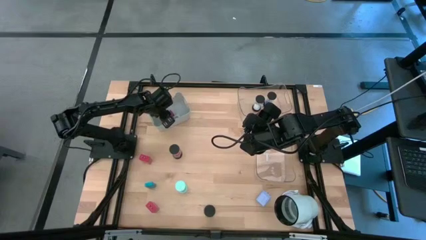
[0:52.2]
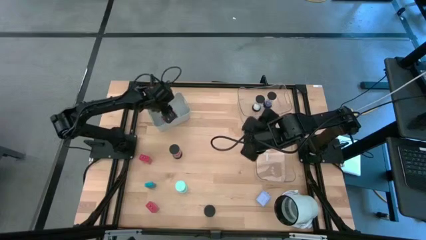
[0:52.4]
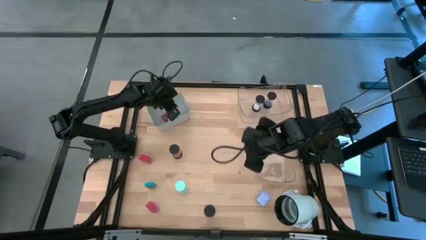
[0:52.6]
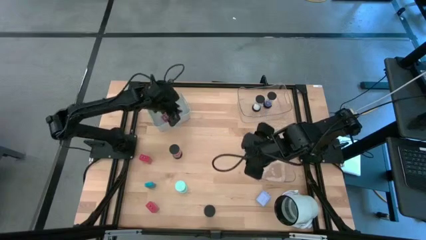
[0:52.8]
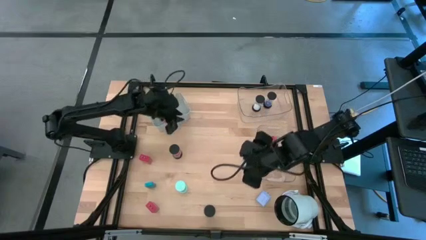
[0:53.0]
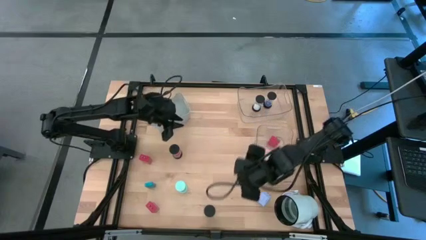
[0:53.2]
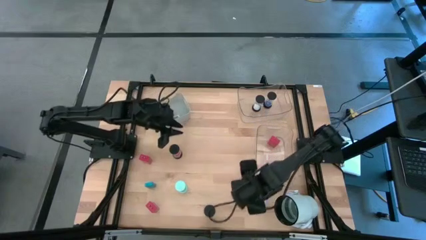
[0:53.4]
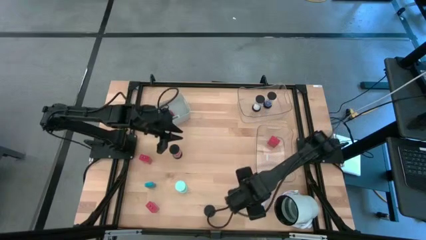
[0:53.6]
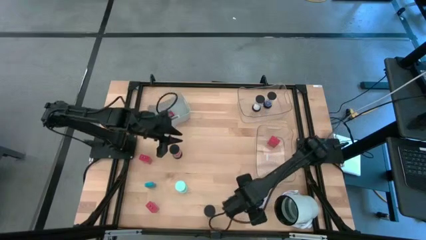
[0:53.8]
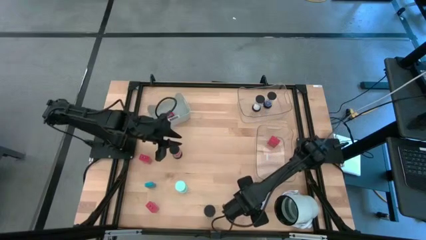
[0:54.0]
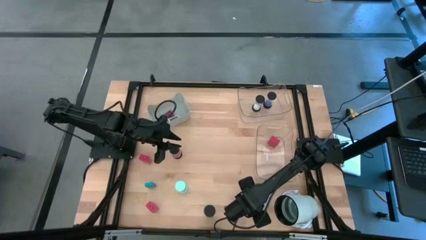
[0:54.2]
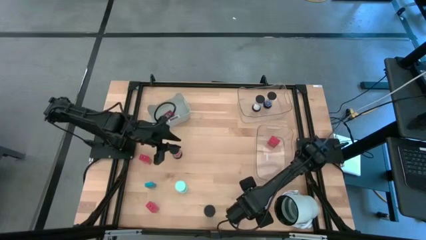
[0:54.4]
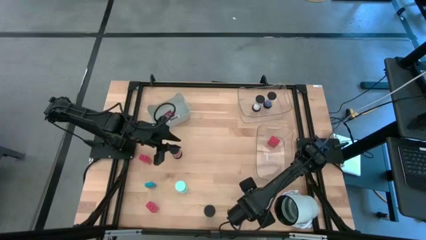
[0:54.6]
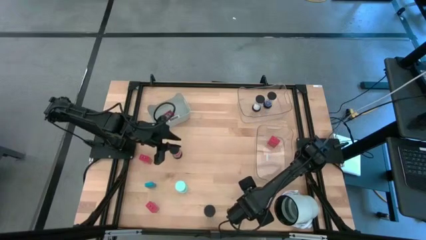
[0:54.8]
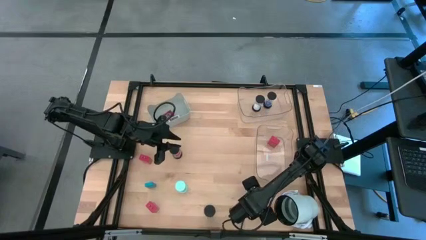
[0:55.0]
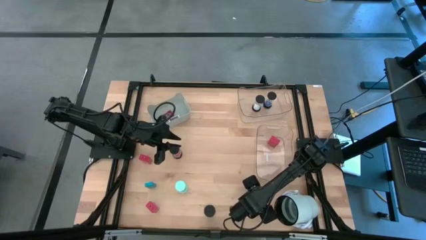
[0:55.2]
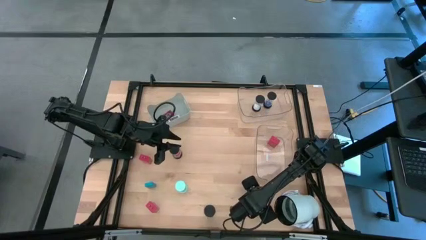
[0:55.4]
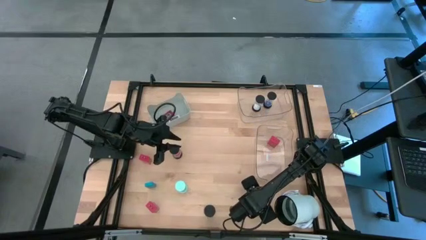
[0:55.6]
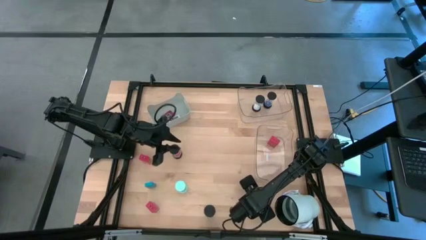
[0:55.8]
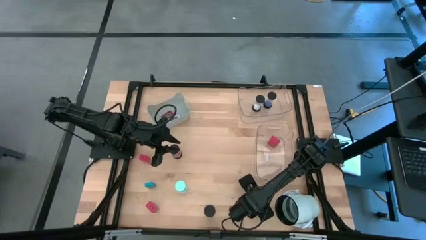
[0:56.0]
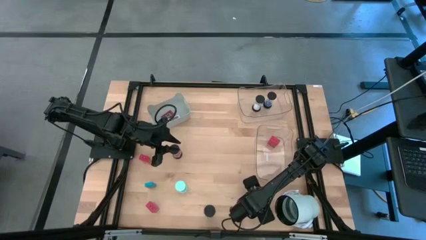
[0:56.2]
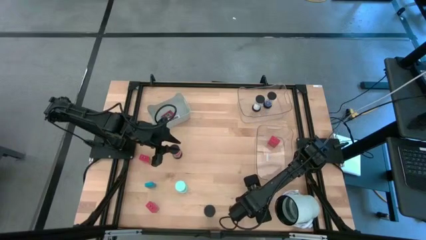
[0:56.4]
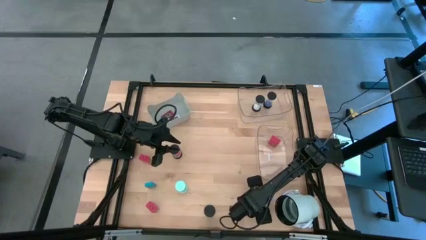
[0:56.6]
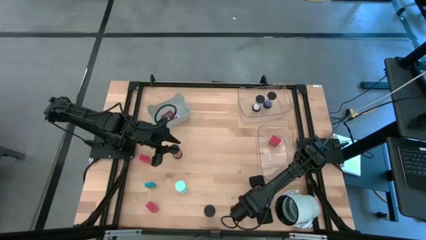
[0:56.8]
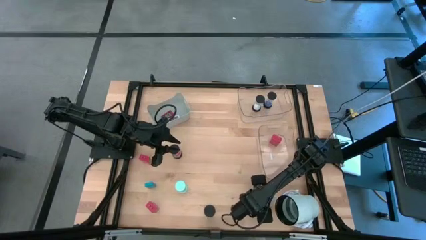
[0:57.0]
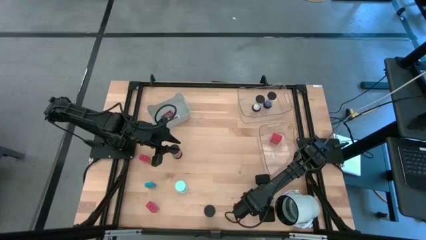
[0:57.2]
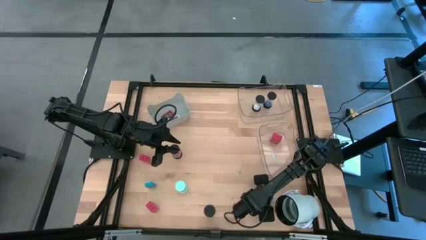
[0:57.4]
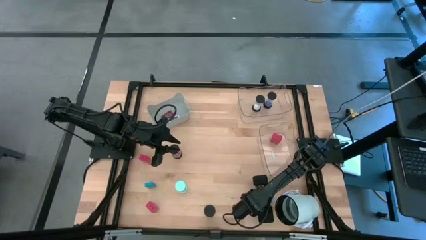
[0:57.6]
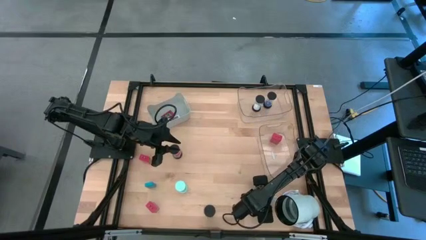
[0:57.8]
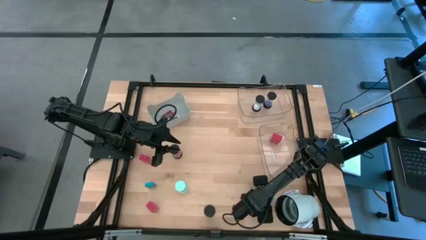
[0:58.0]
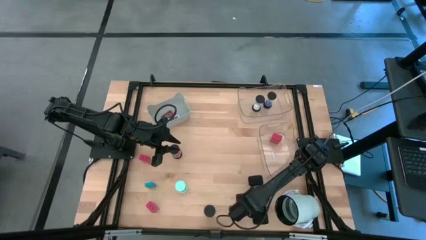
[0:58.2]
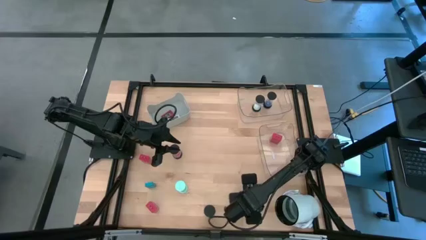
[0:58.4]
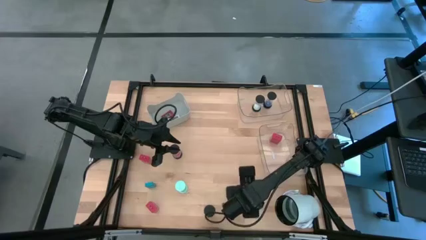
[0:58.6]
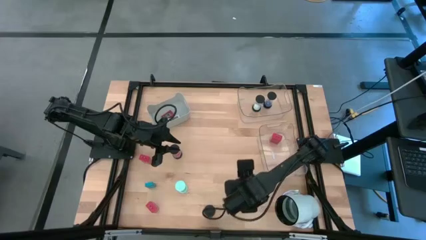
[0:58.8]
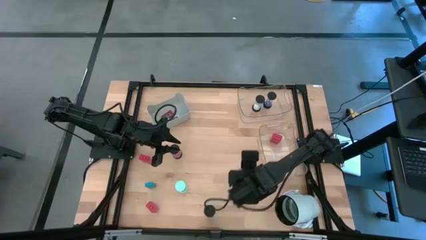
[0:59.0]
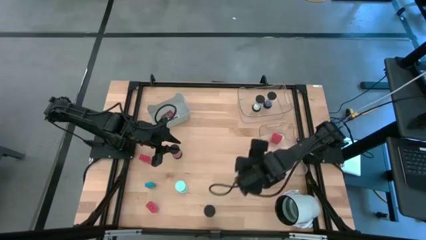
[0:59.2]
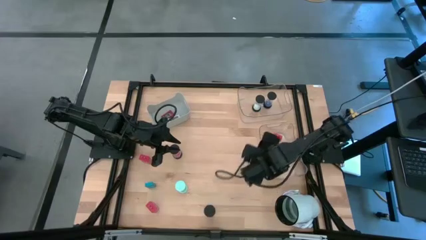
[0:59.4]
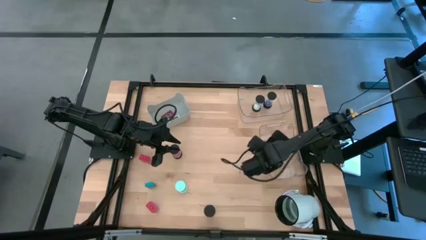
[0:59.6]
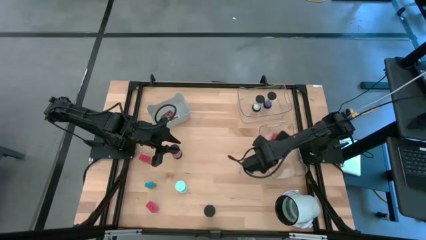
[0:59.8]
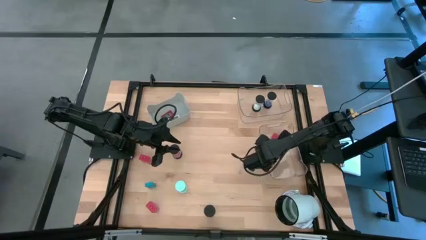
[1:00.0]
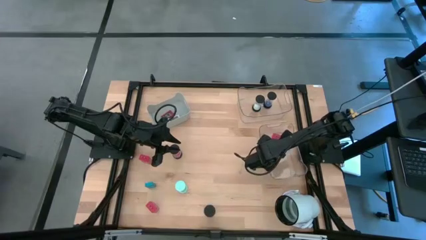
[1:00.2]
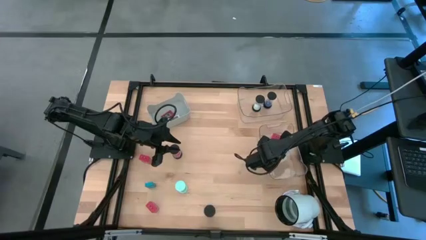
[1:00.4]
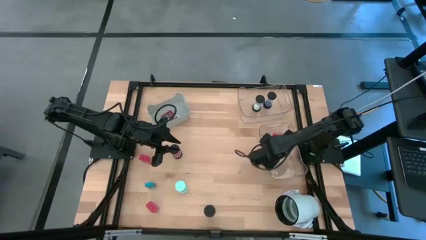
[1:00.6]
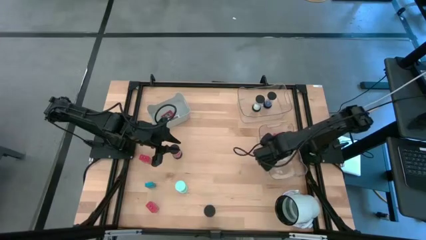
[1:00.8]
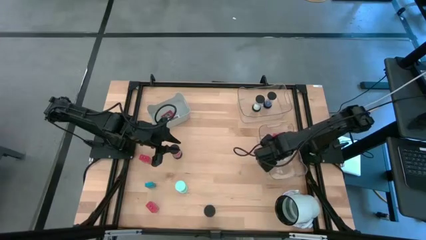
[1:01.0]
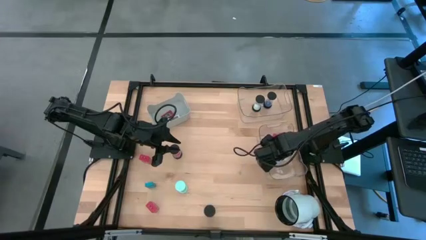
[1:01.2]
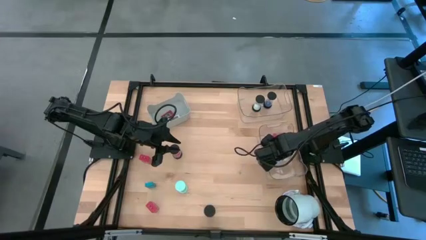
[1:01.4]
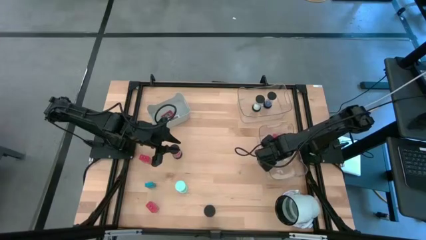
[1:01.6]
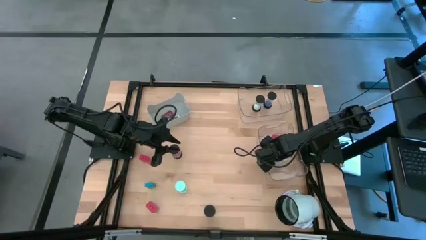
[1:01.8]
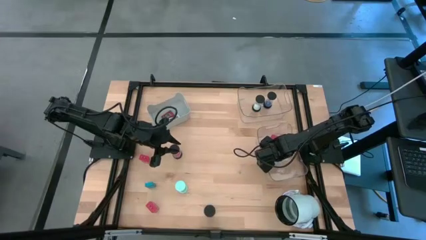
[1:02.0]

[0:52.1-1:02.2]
Task: Pick & Place Office items
Put the white charger adapter into the bottom transparent bin

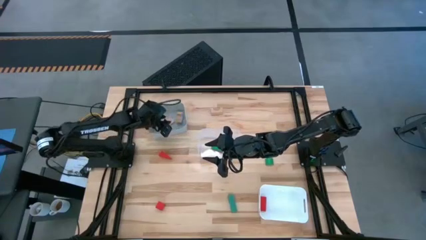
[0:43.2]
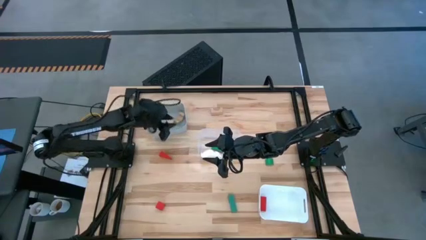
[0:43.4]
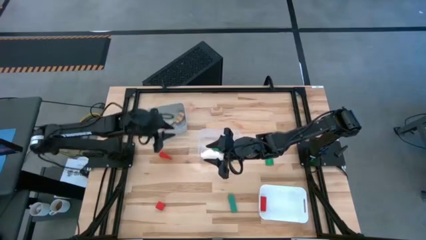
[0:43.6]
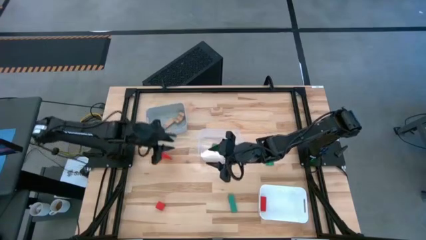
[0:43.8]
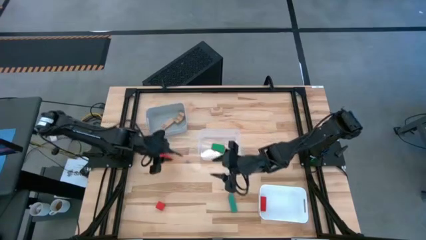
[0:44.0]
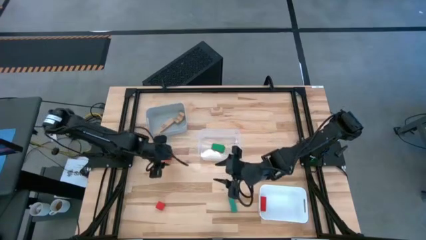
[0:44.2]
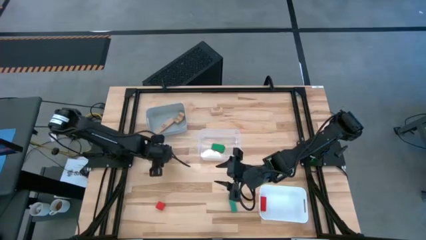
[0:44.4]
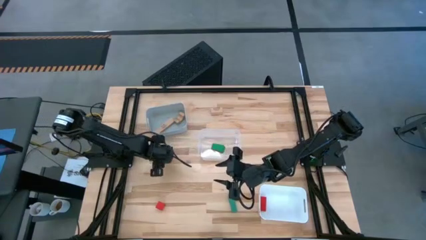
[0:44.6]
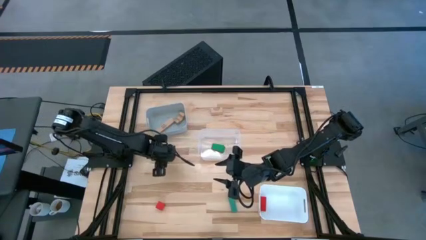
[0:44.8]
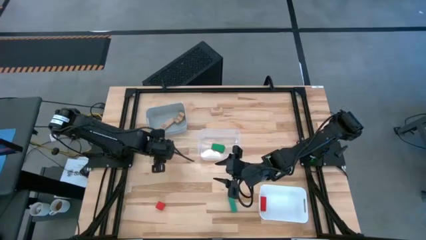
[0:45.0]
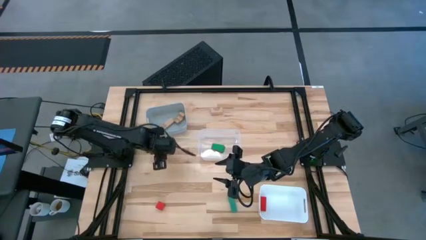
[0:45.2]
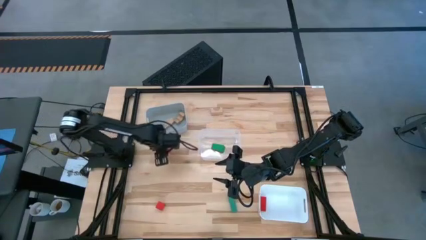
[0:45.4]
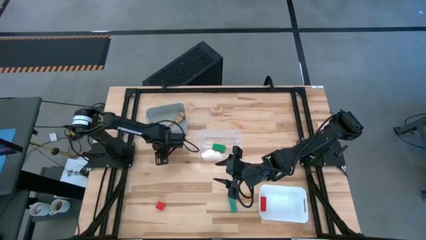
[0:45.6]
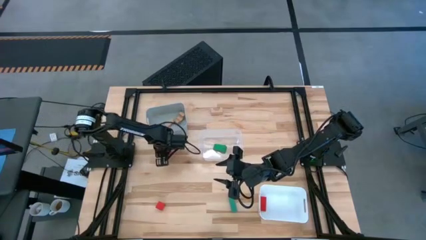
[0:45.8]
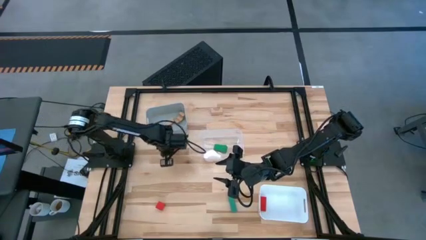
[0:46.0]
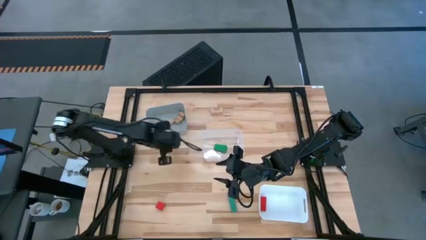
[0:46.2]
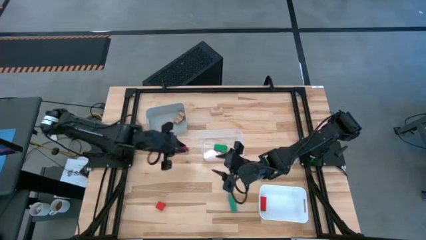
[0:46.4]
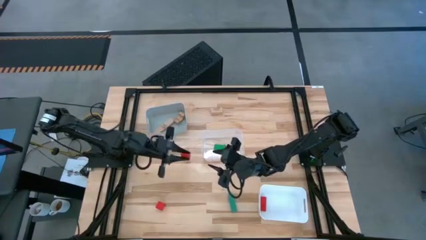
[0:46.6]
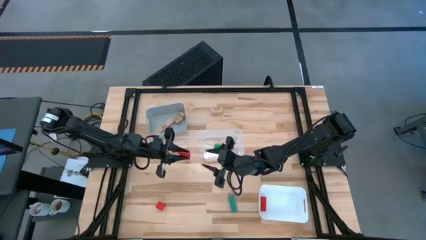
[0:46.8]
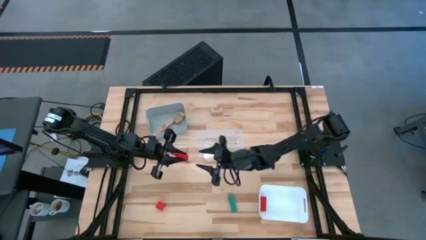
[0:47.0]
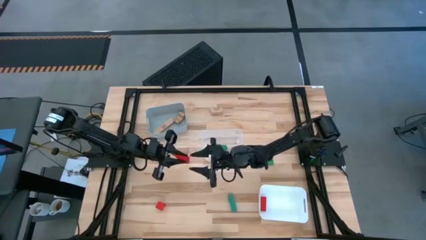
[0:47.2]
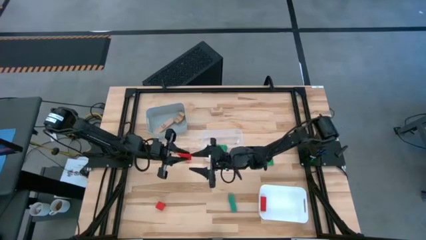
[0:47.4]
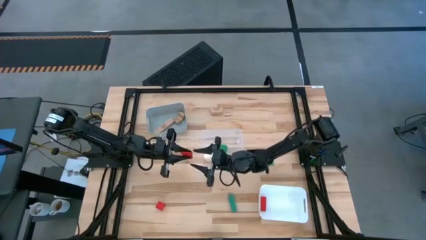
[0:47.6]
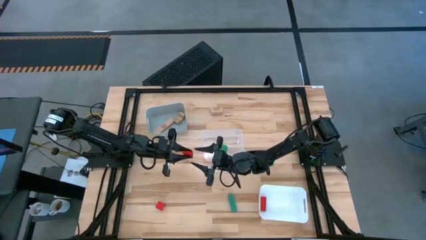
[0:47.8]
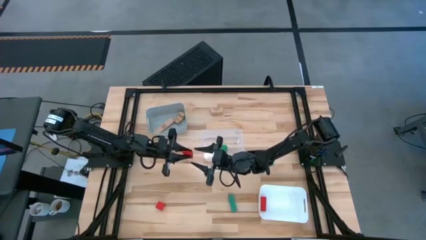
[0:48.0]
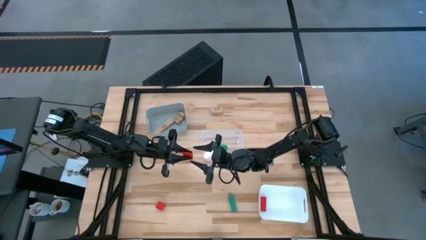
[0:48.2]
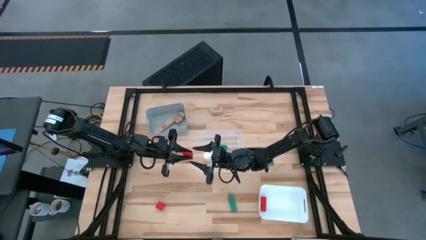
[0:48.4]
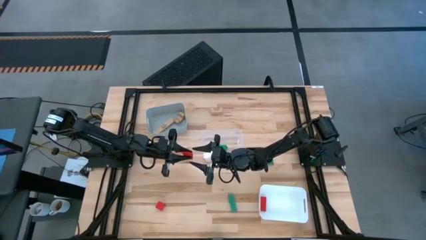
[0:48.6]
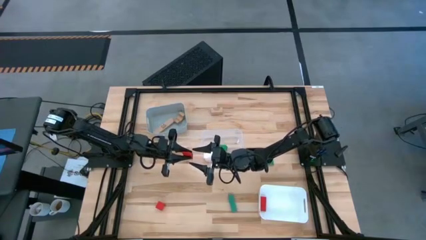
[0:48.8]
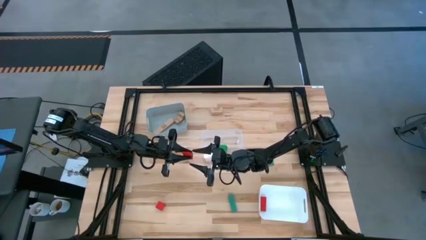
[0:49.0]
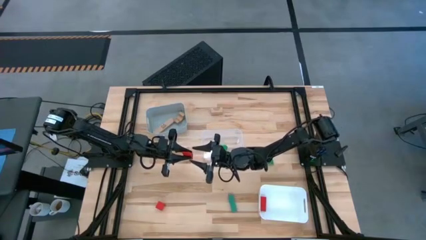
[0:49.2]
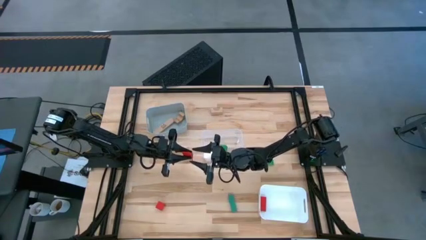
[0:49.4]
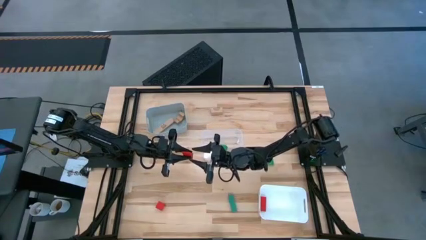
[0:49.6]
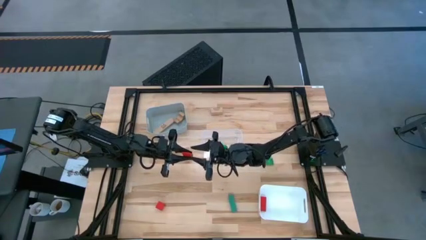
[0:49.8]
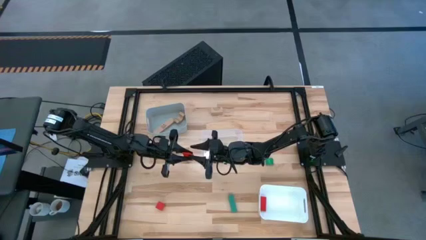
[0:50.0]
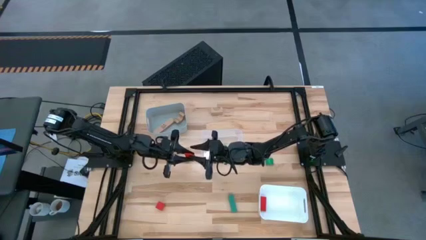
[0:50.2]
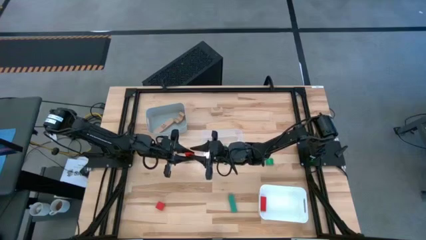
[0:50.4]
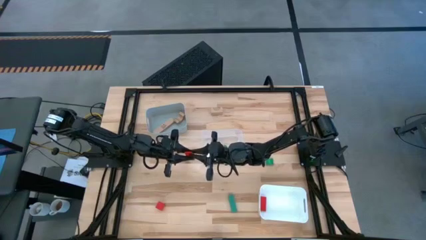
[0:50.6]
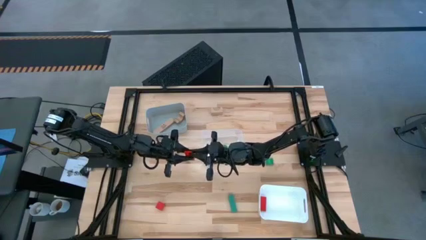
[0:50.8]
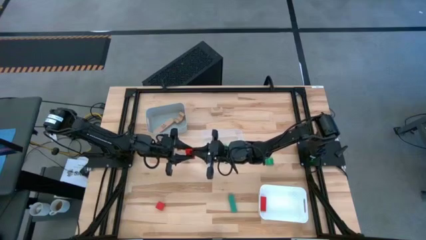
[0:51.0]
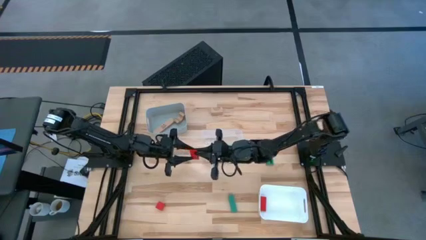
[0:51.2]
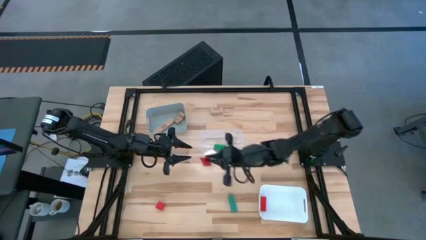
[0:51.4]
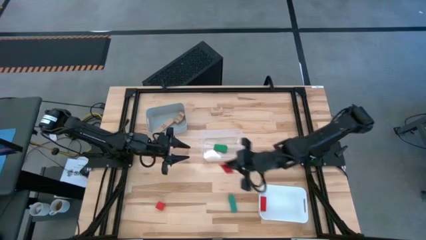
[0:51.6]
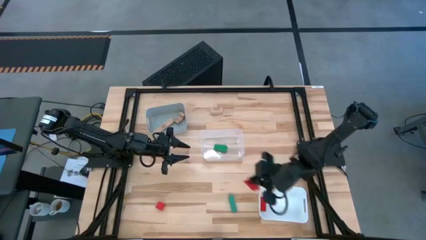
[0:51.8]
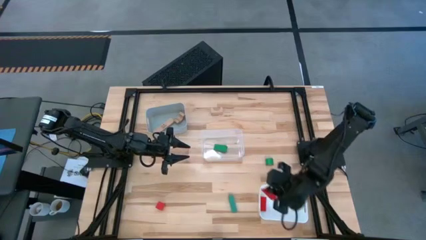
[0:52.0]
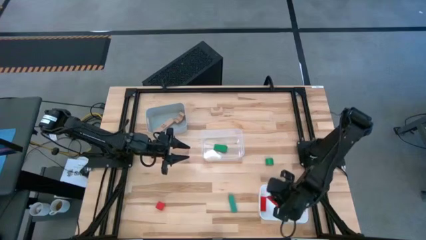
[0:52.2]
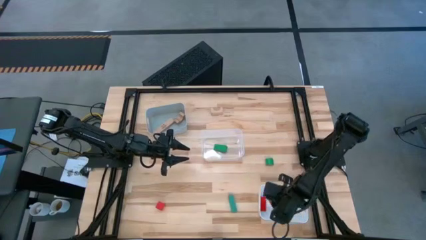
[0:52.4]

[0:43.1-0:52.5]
Task: Sort & place blocks by color
Put the top red block into the white bin
